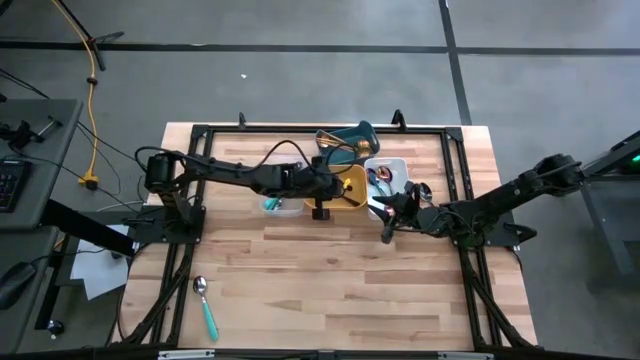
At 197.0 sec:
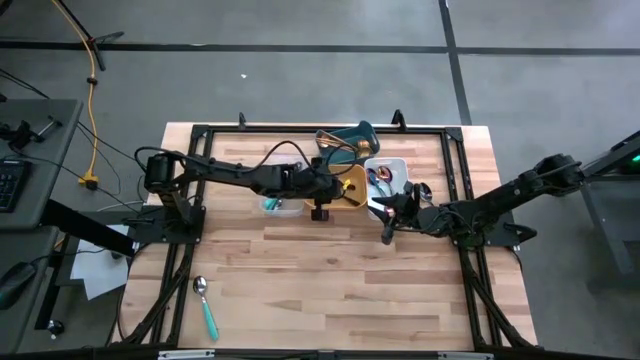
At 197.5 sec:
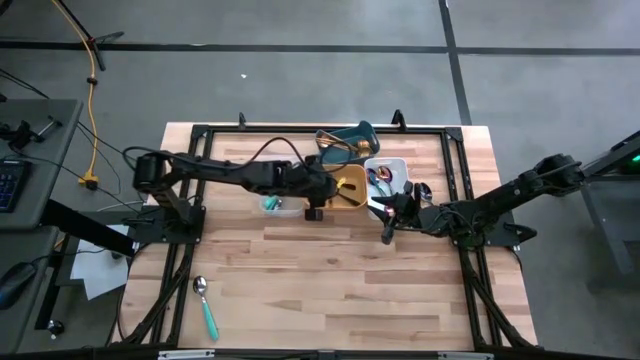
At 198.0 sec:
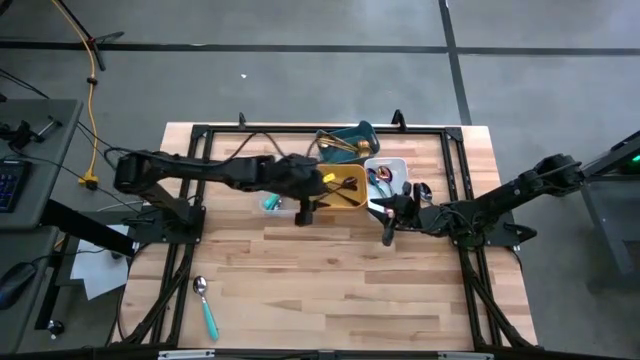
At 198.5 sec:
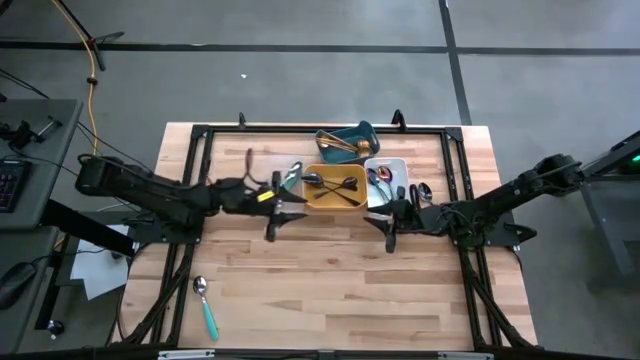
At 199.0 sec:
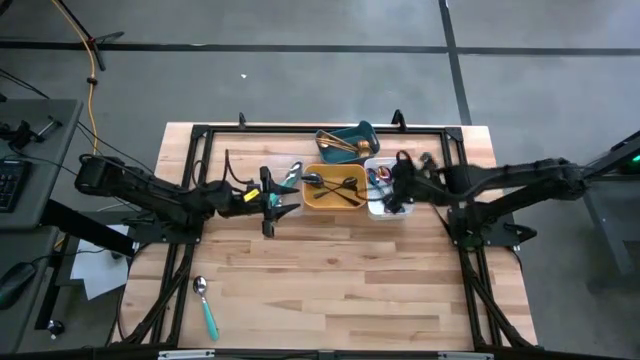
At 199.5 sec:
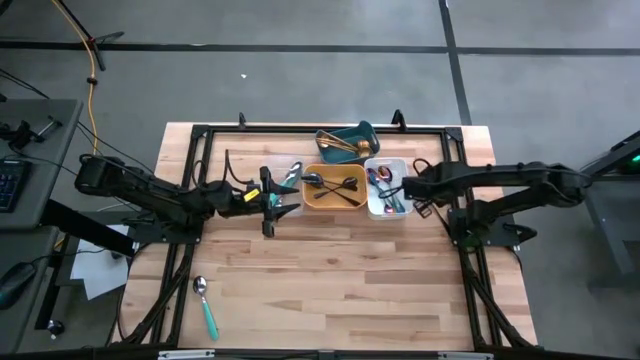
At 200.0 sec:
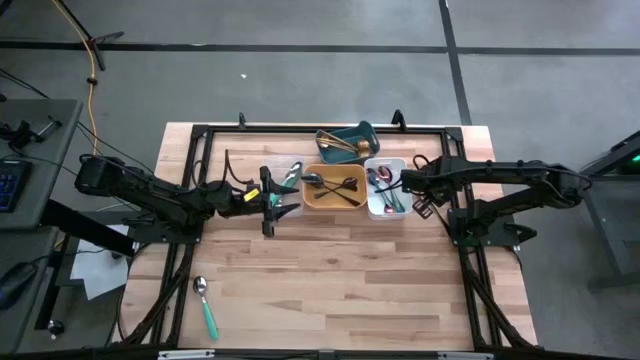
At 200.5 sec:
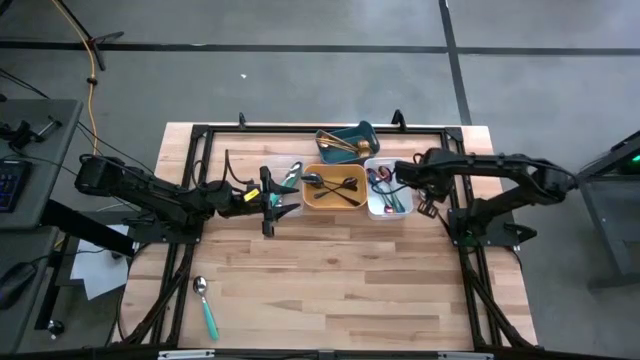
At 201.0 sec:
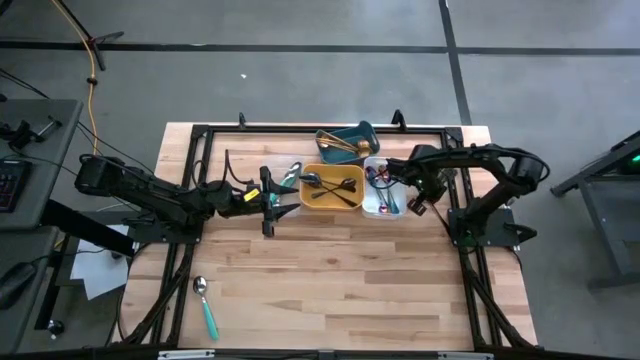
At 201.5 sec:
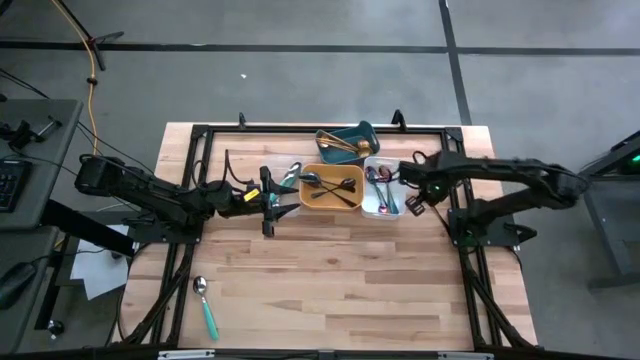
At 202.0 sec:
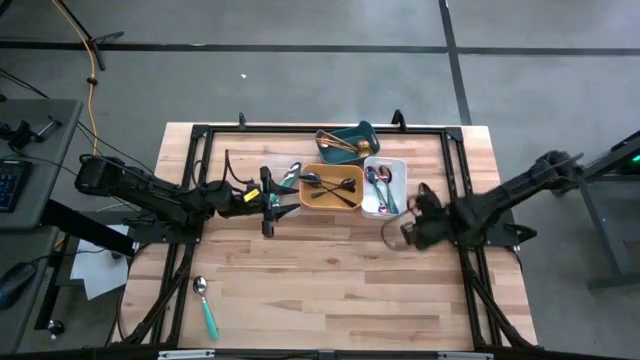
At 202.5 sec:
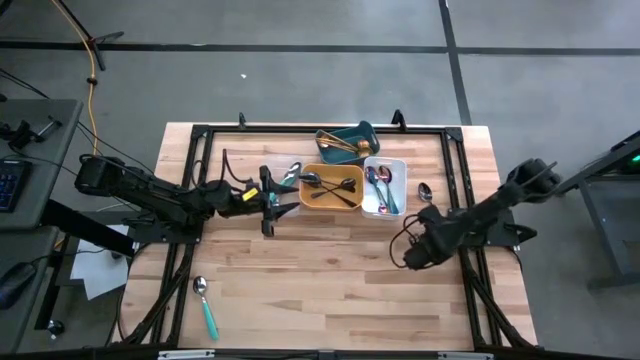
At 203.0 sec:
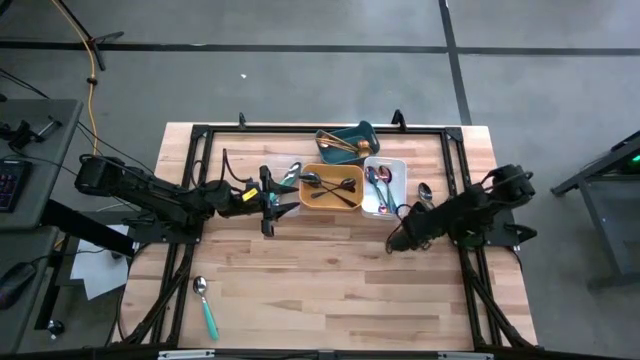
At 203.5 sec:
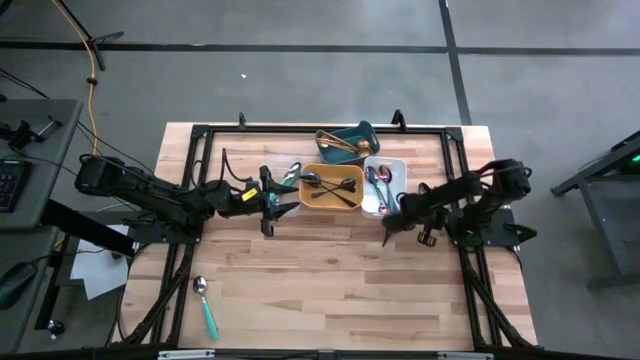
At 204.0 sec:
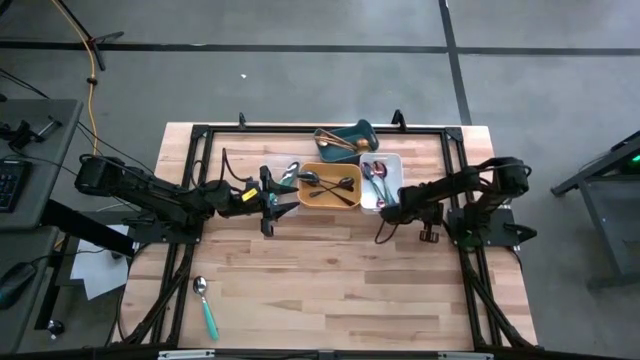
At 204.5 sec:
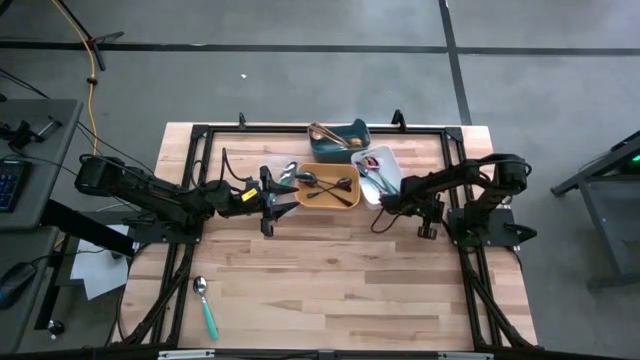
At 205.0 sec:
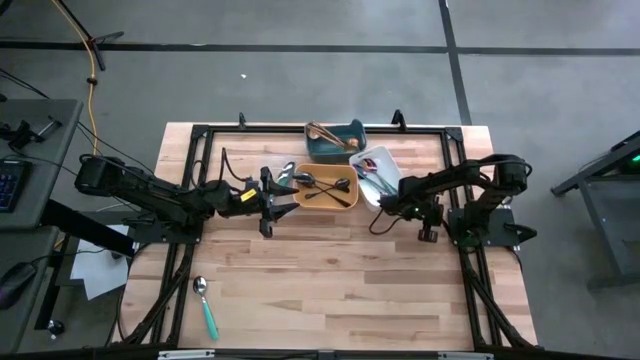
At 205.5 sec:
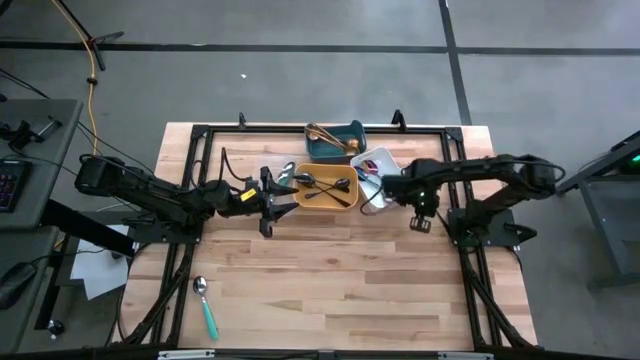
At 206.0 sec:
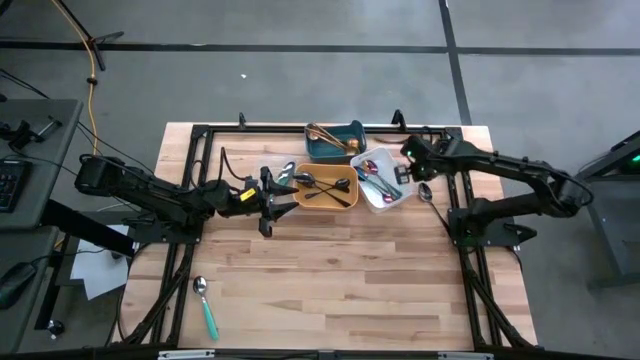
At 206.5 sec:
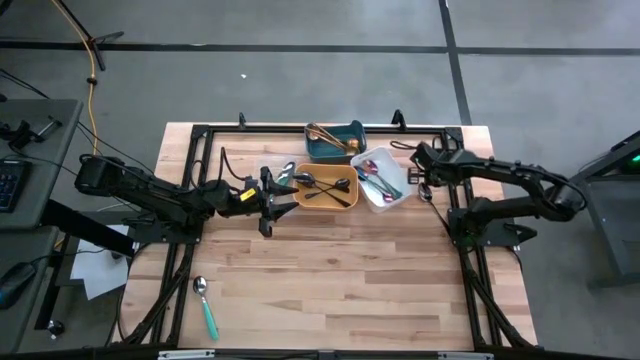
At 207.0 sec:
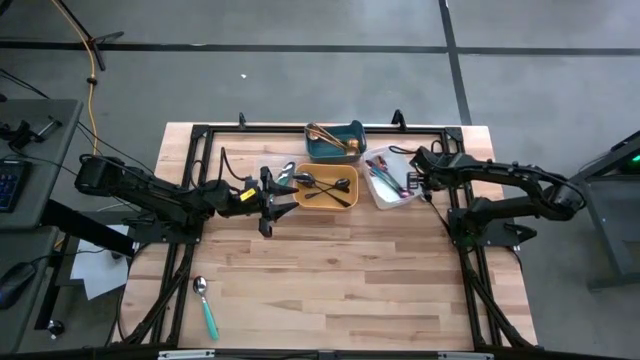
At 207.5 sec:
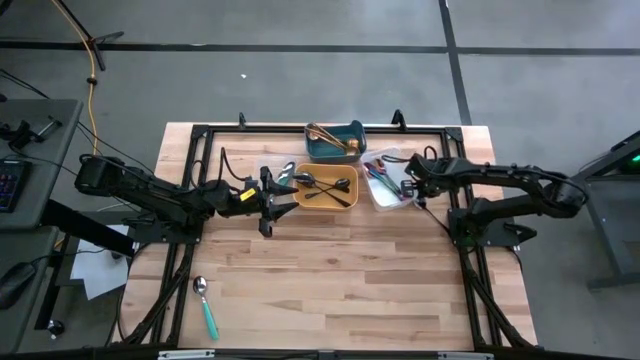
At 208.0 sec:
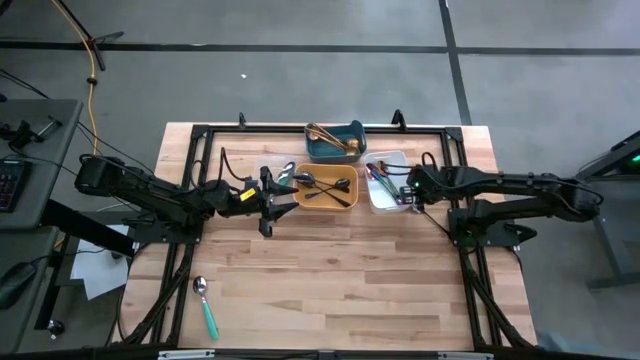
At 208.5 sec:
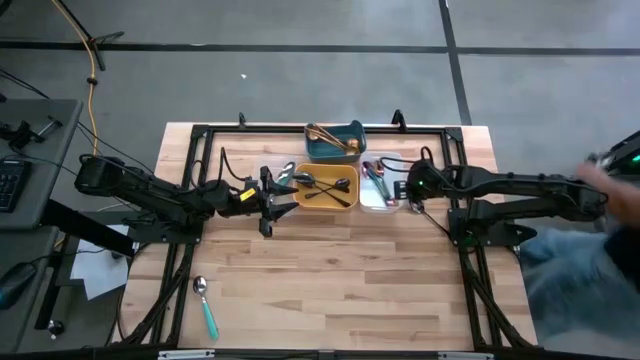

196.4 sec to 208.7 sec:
Task: Sort silverware by color (type)
Put the silver spoon into the orange bin

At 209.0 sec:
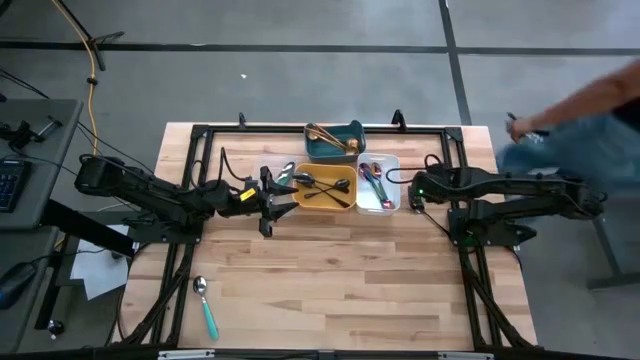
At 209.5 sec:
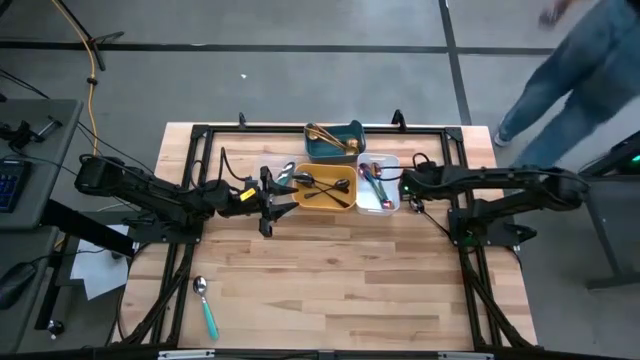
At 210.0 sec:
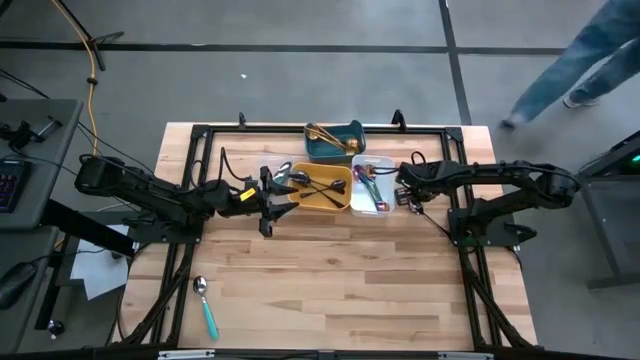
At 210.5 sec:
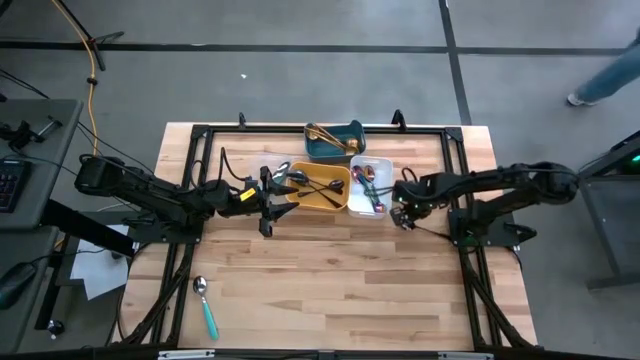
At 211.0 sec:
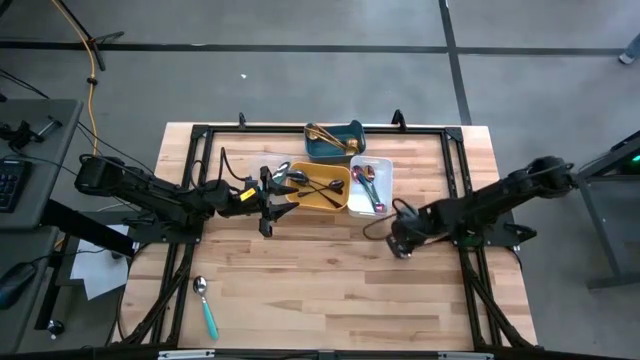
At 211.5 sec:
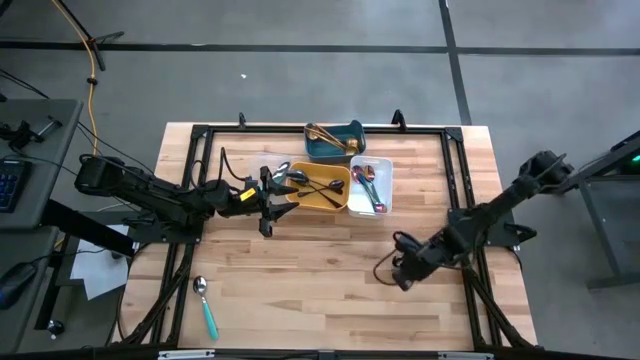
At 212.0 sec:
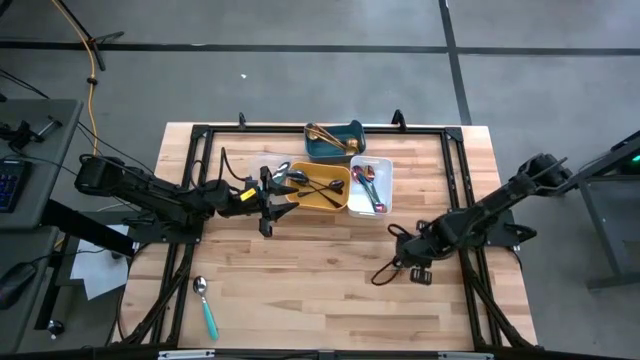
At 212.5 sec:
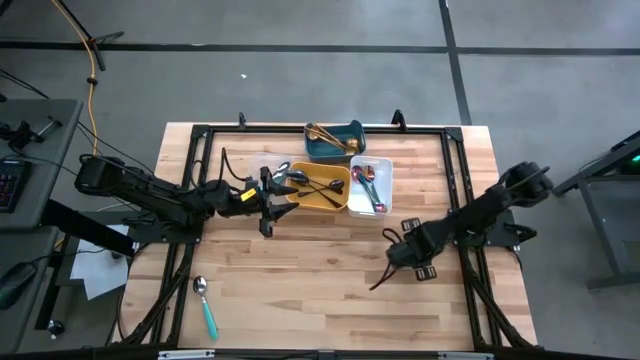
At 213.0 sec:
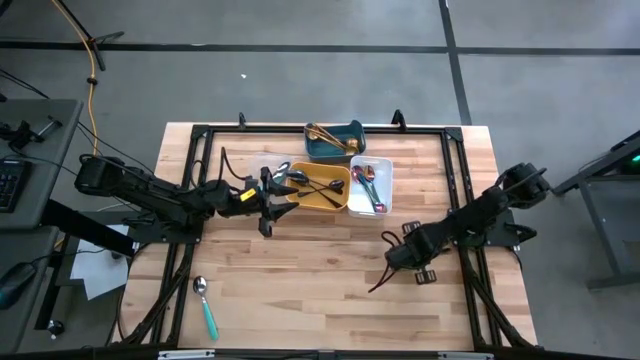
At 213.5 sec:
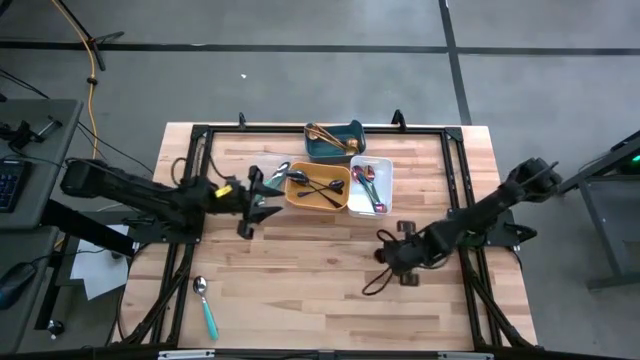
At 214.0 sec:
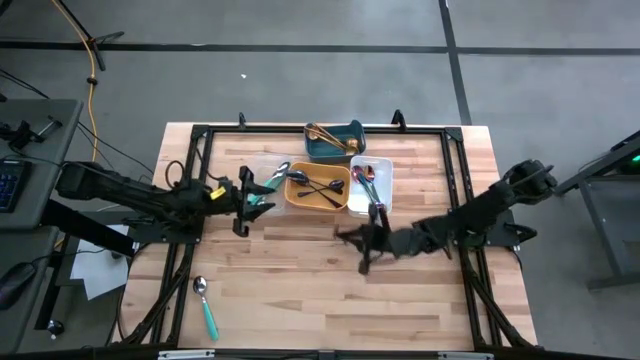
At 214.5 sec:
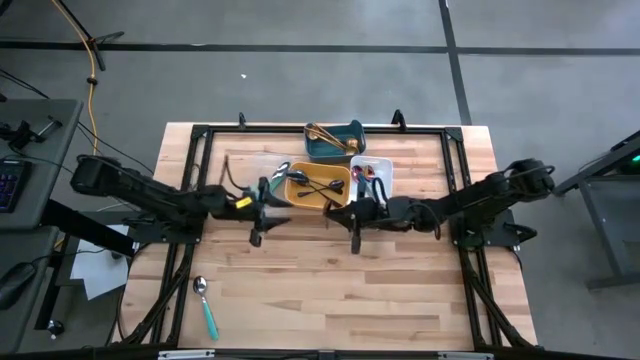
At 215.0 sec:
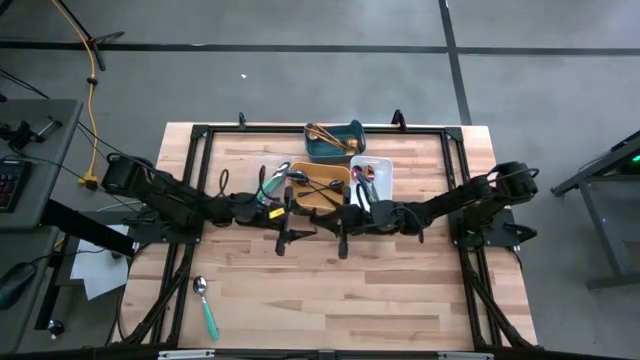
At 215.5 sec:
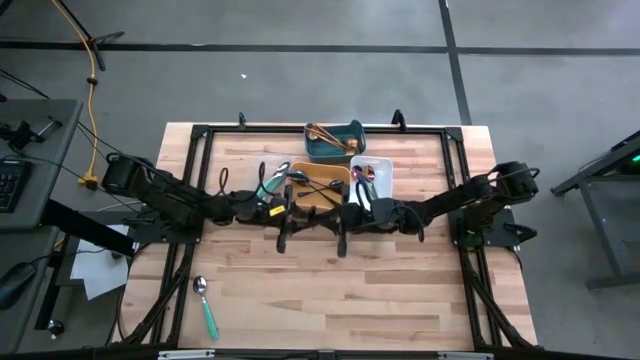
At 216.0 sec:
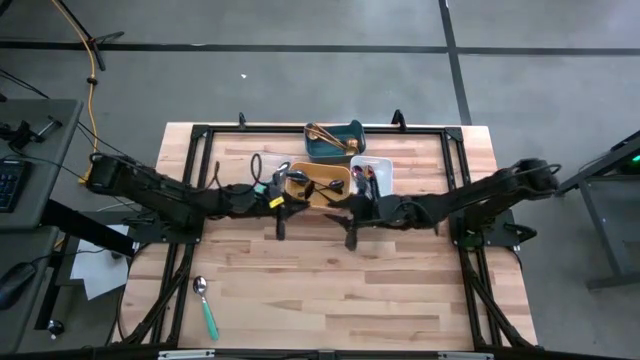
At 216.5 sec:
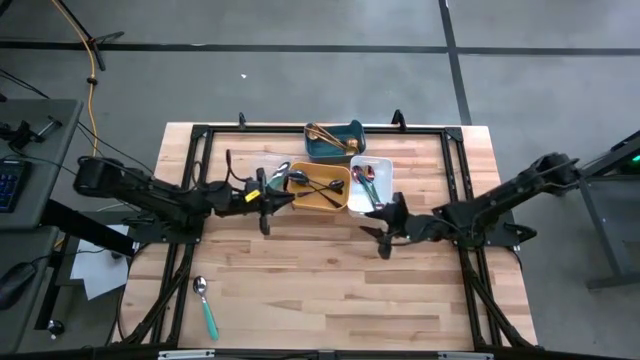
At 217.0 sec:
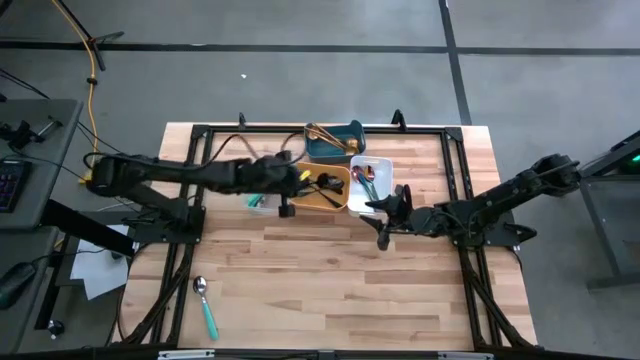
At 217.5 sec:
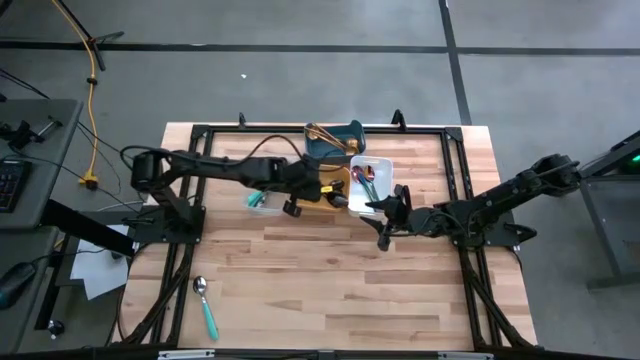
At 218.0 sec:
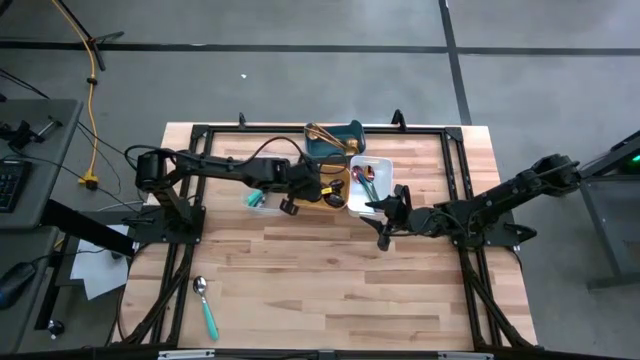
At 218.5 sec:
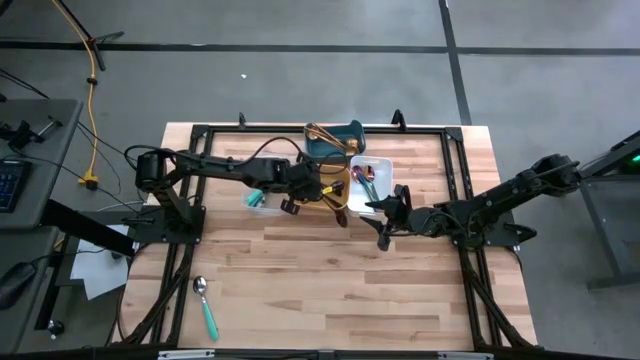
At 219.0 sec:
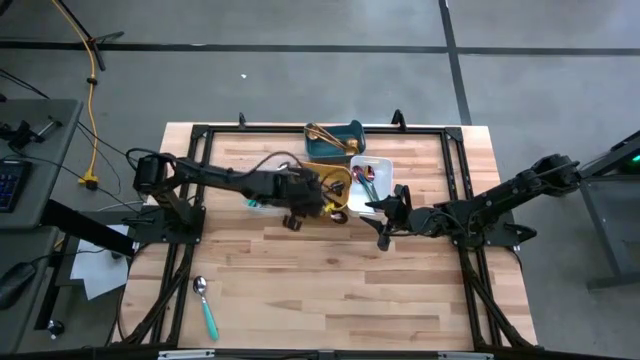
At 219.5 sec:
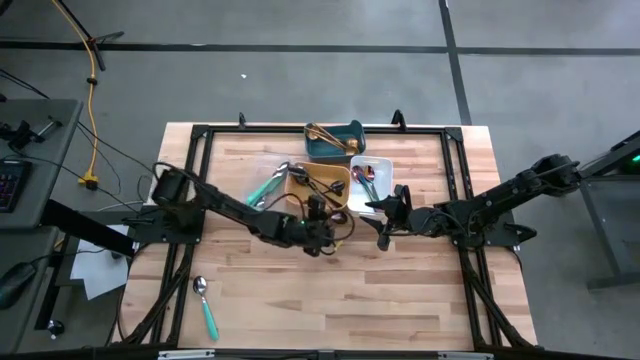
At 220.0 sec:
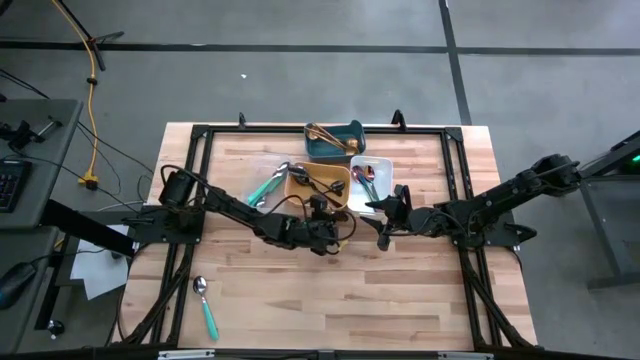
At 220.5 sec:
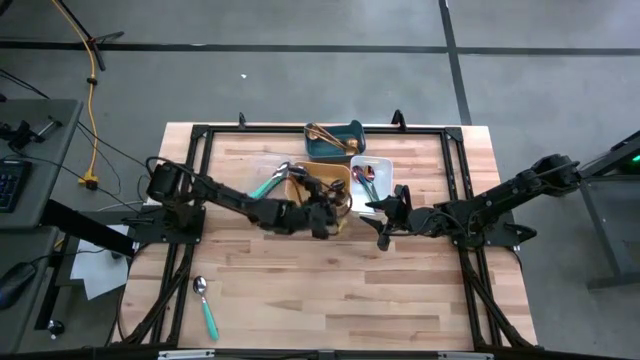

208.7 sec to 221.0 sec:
Put the silver spoon into the orange bin
